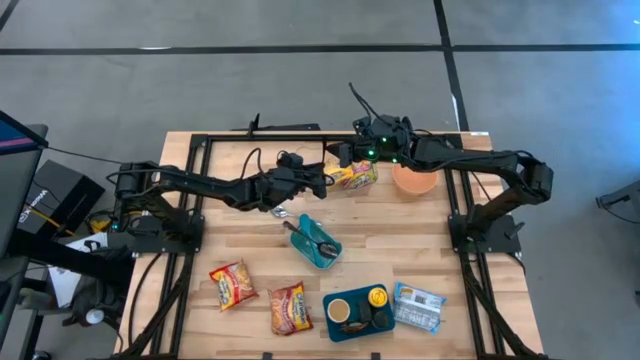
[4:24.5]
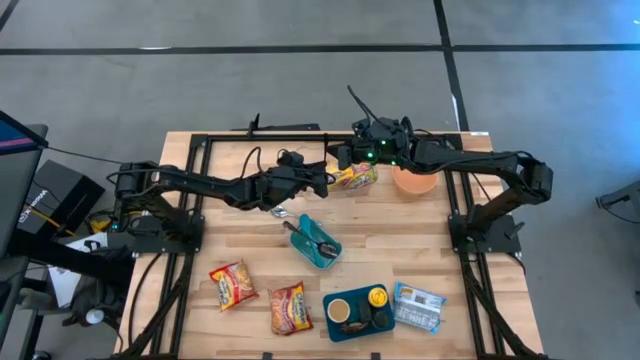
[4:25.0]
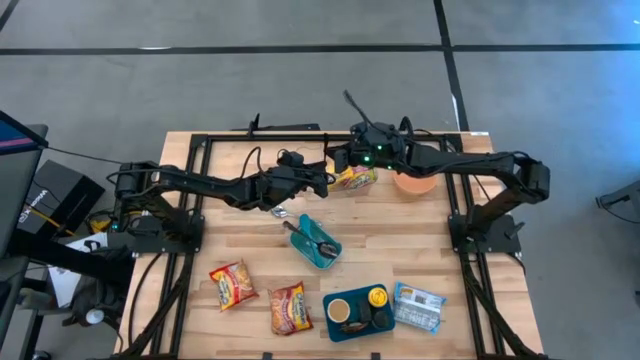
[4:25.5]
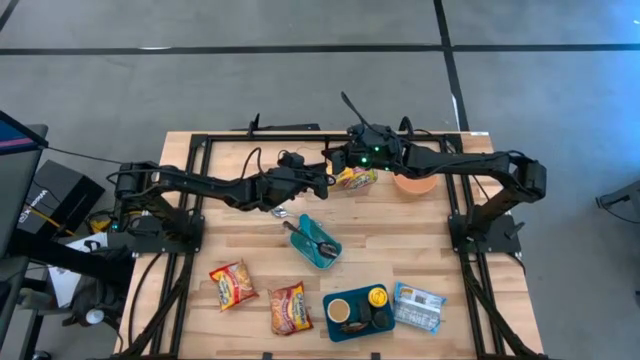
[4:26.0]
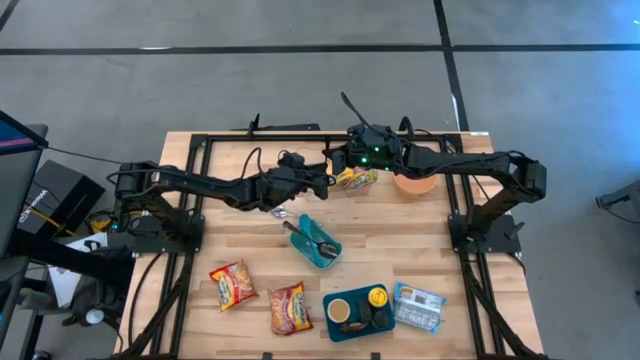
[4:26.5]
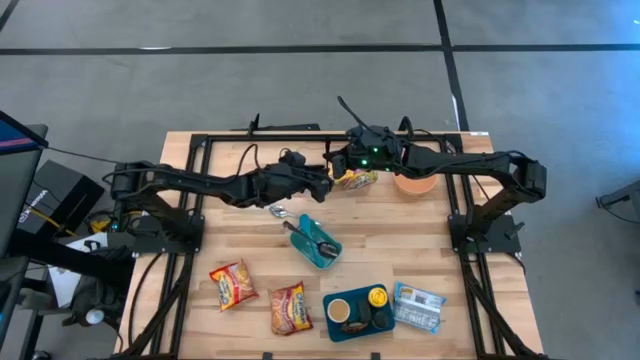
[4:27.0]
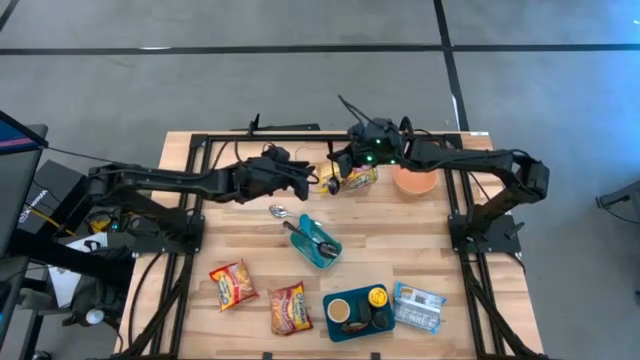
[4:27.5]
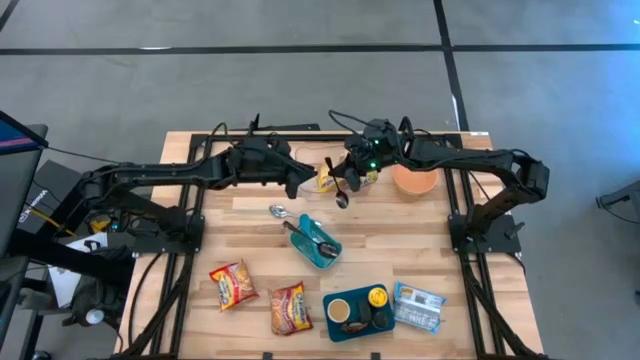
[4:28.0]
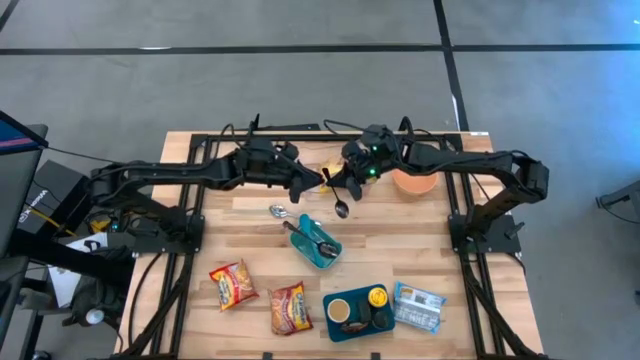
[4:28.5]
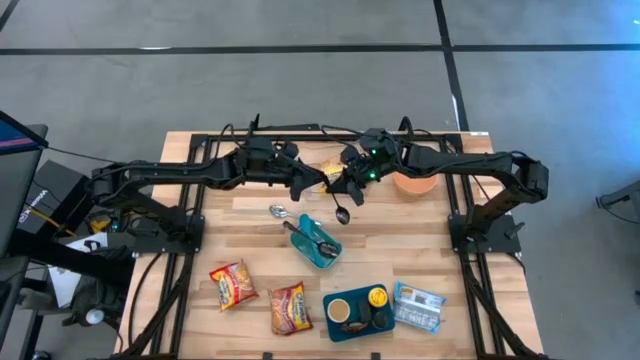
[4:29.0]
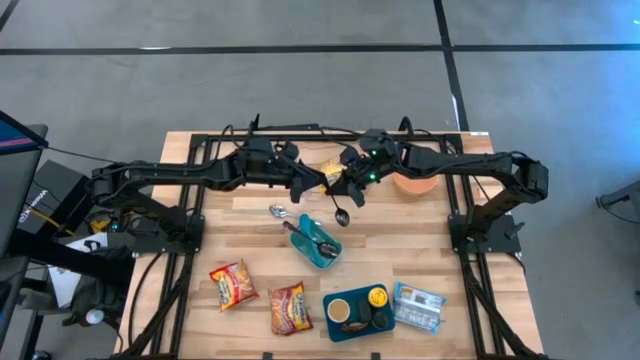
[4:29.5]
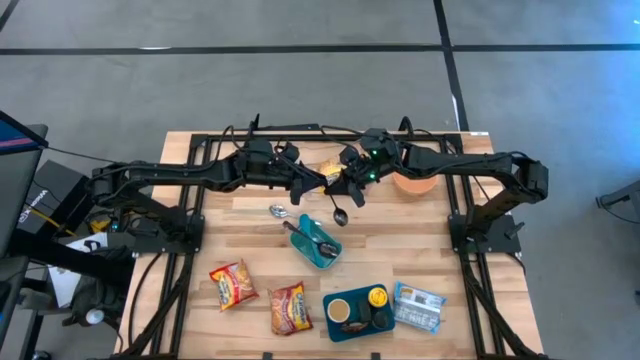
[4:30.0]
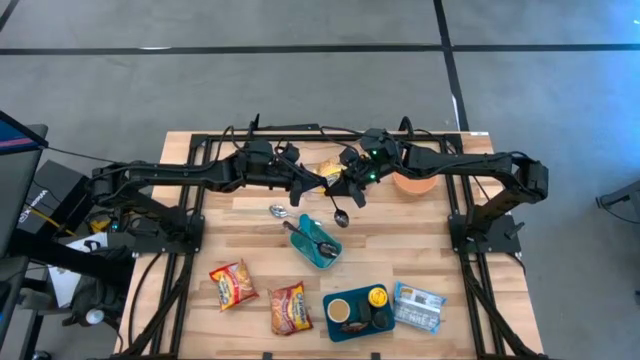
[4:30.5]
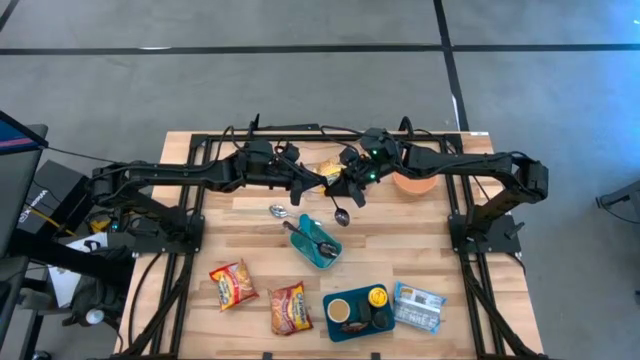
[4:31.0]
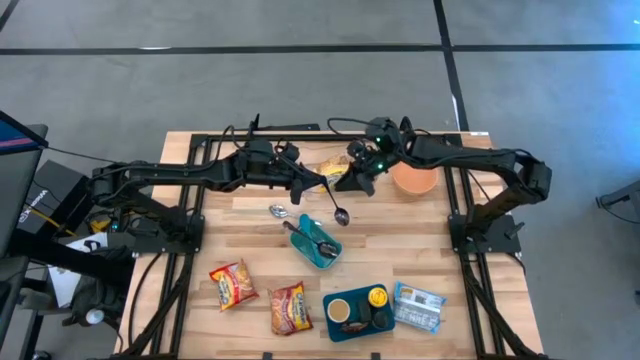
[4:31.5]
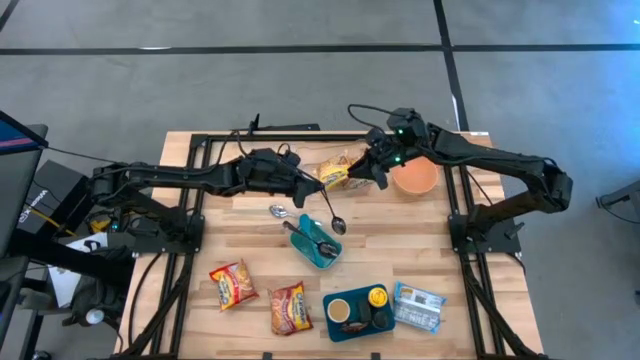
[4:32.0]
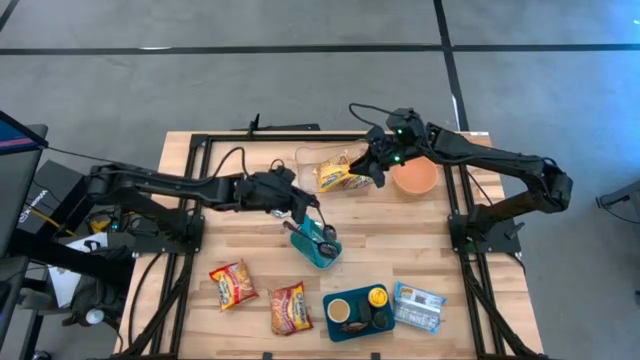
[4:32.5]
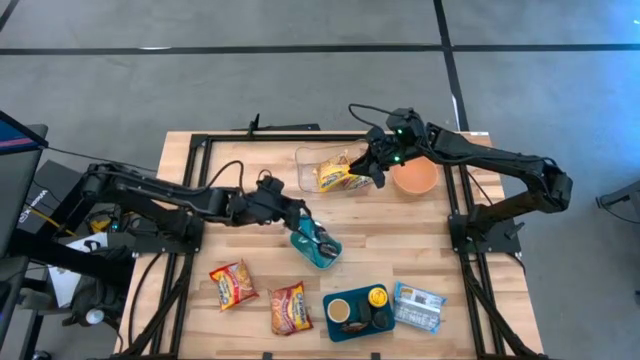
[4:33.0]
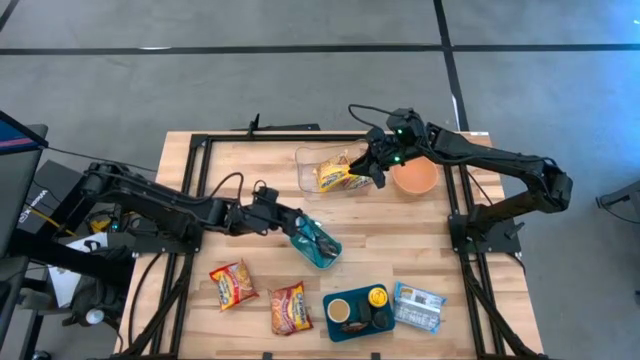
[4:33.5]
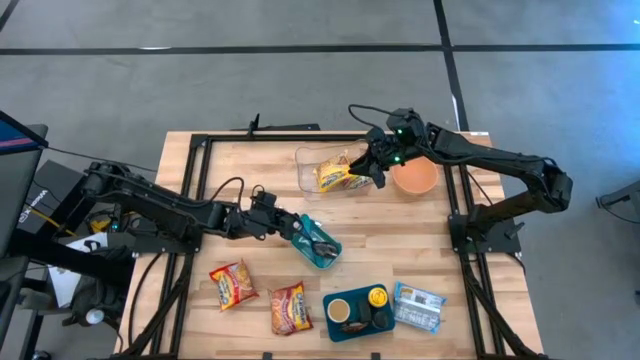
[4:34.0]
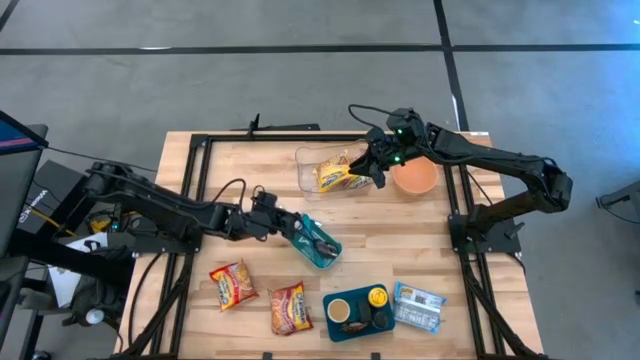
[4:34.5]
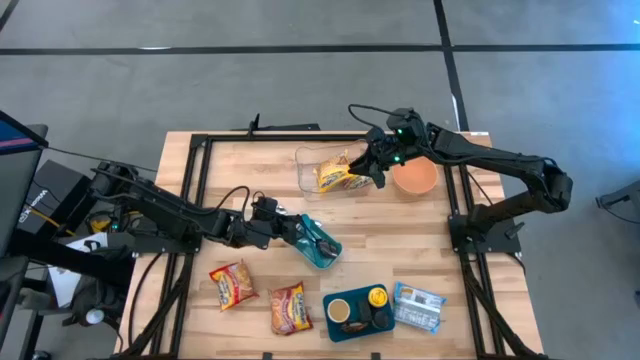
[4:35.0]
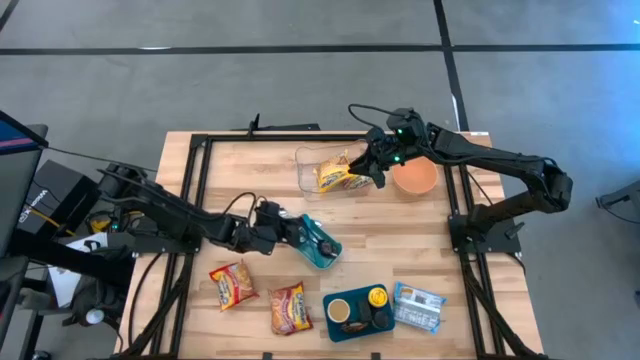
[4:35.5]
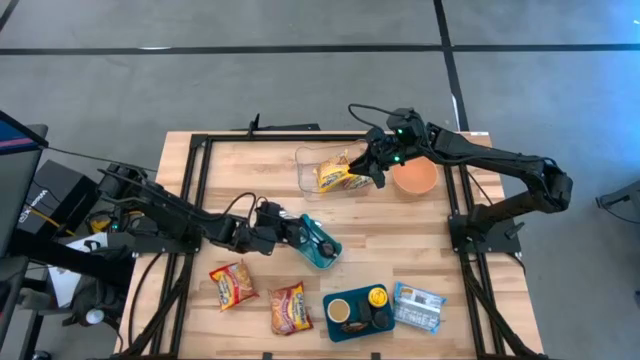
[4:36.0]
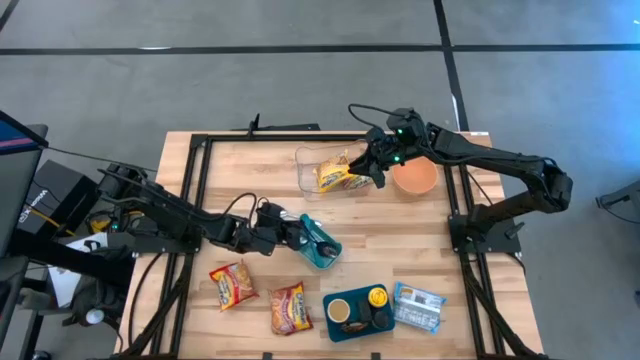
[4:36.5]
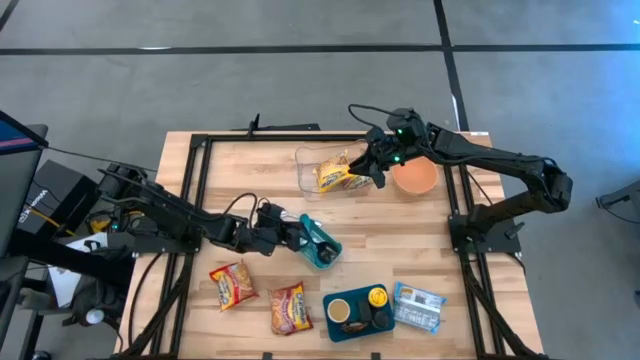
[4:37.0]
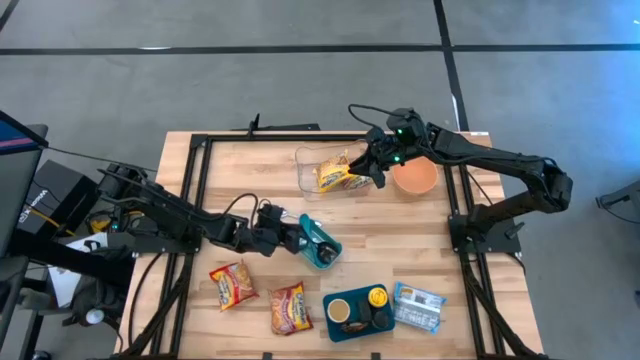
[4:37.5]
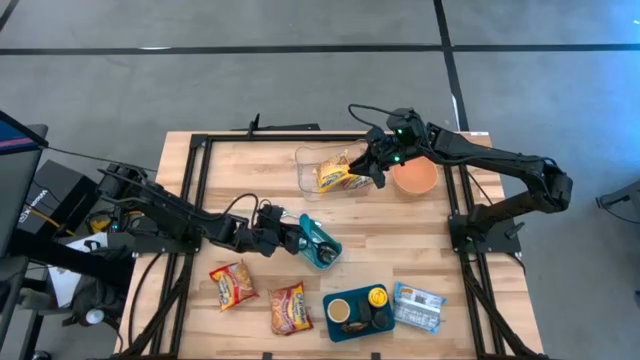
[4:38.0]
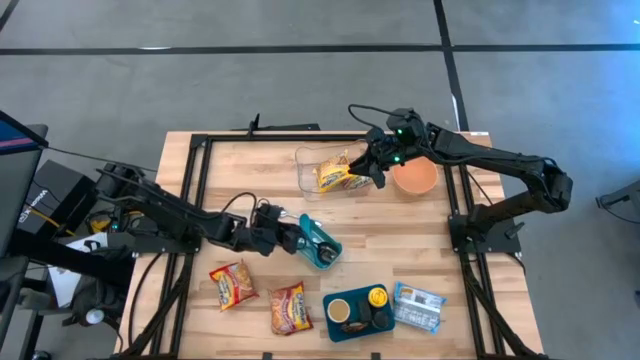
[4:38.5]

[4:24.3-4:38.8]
Task: Pick & Place Food Item
Put the black spoon into the green bin

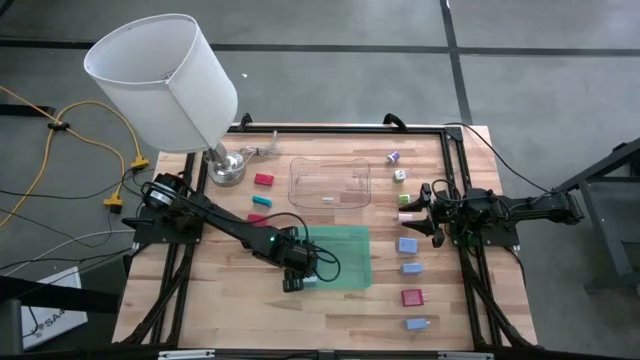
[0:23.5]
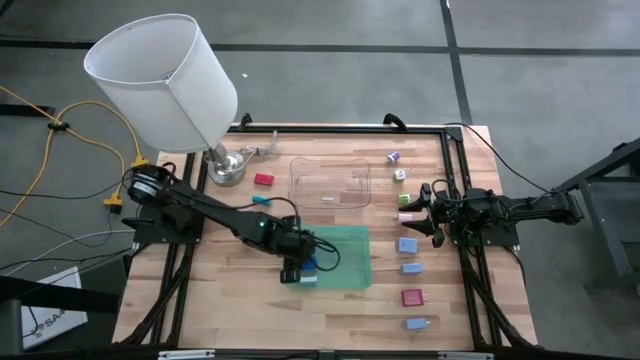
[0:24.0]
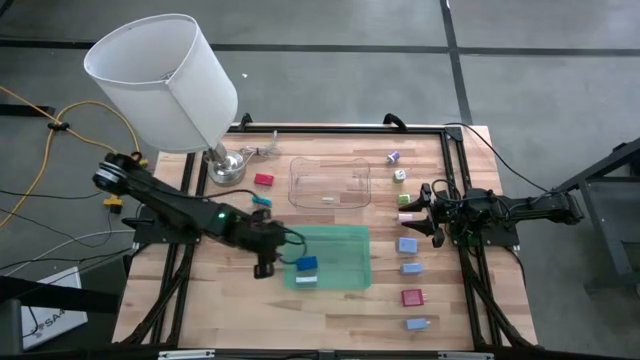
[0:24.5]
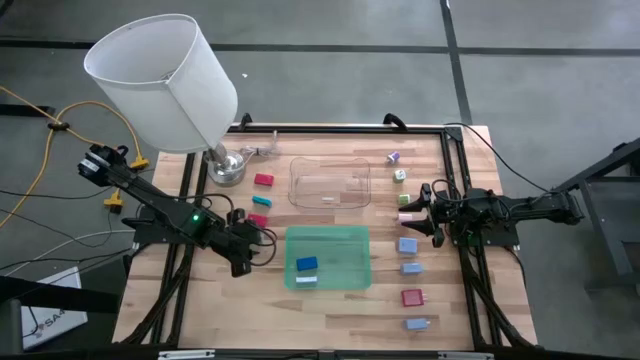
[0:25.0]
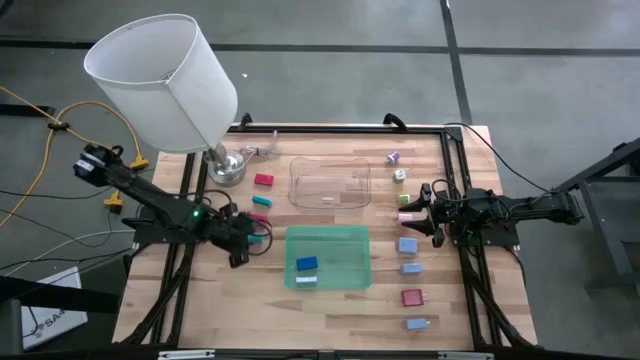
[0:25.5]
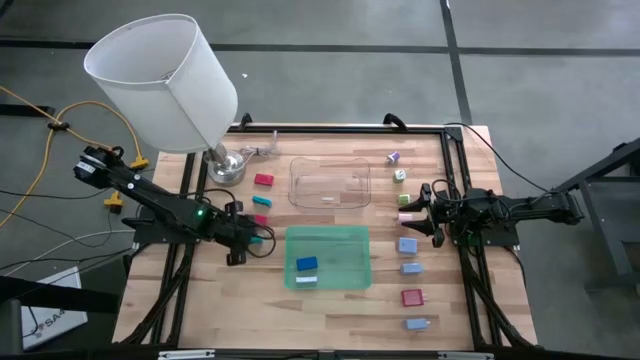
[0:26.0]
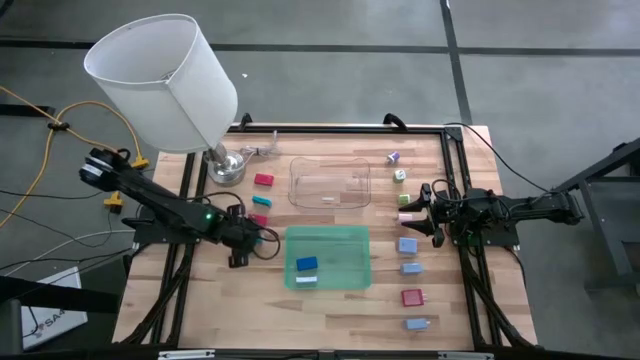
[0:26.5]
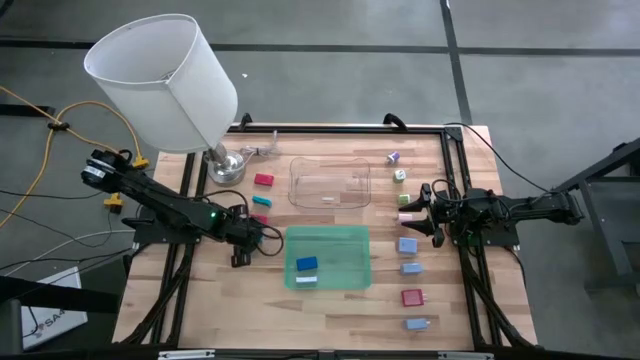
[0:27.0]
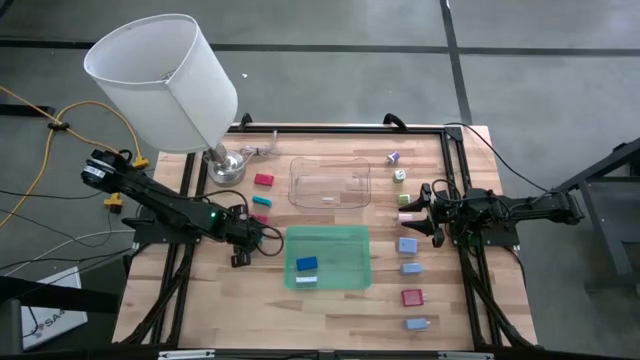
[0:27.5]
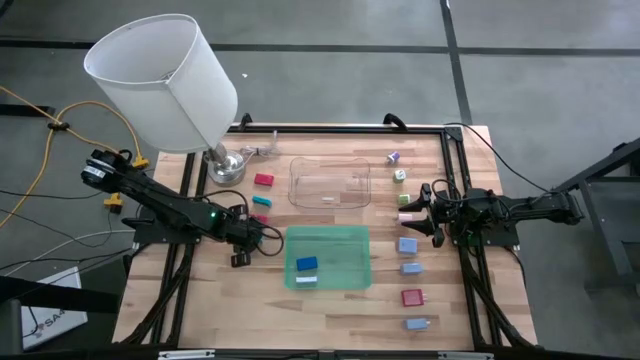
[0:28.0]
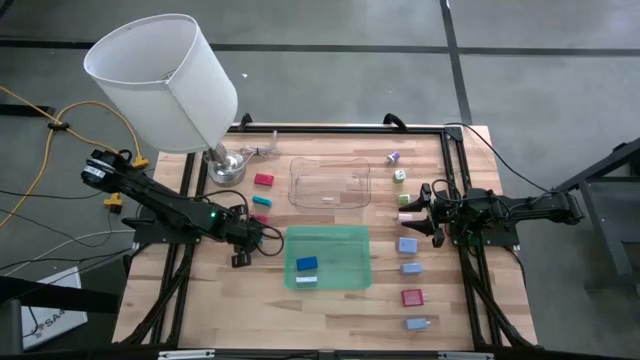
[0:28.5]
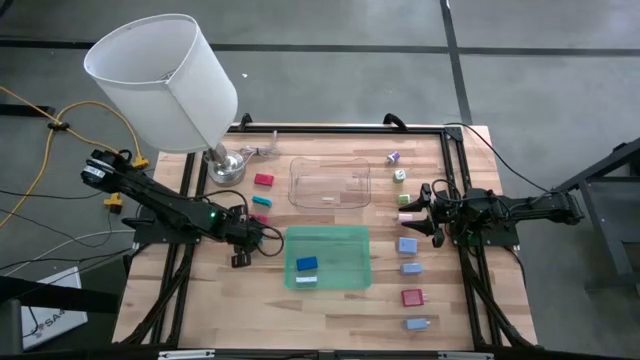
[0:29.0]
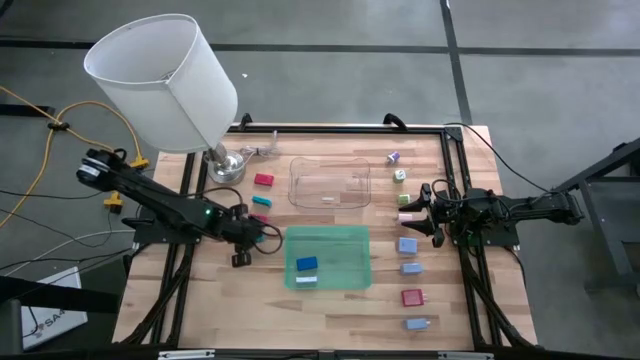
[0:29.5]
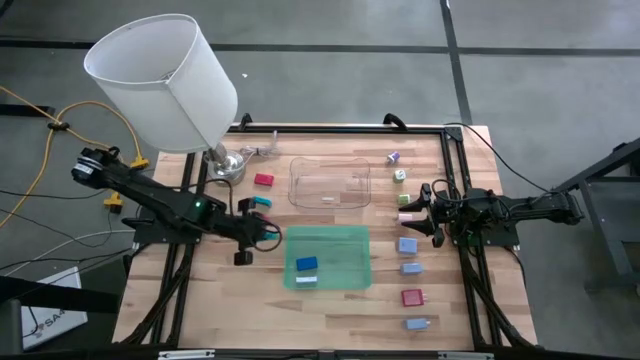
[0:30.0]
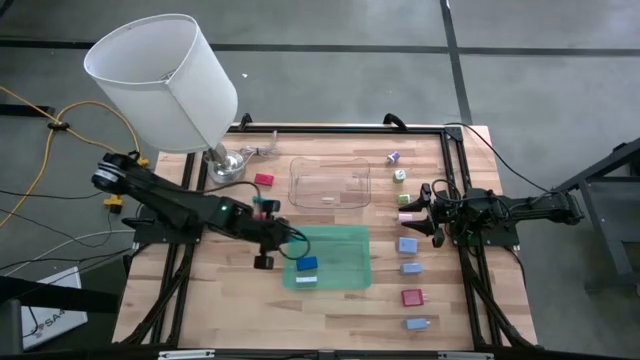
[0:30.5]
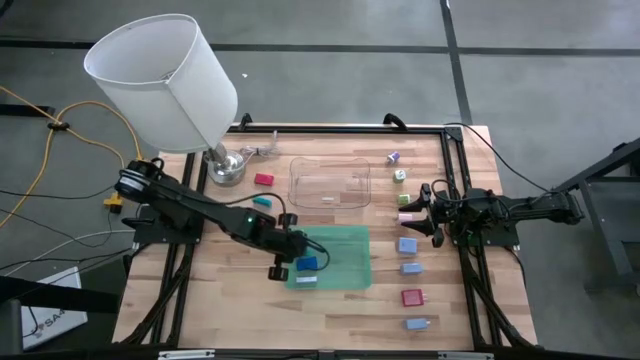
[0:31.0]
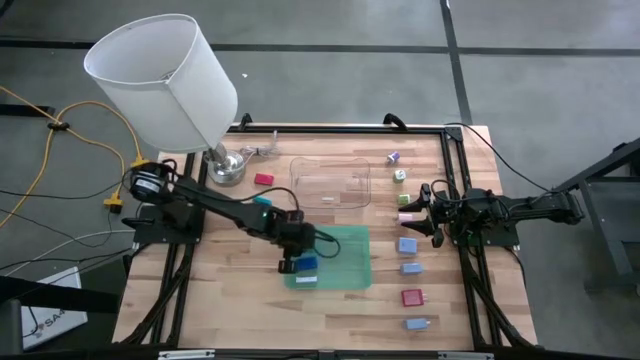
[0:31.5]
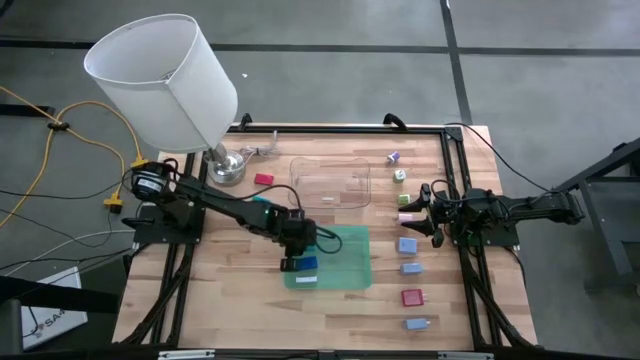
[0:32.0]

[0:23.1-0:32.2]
Task: Pick & Place Office items
Put the bottom light blue digital clock into the blue bin
